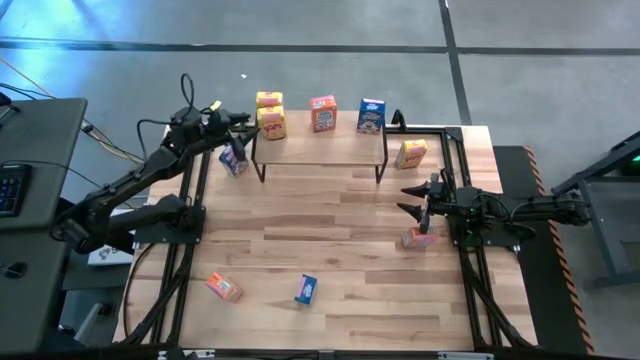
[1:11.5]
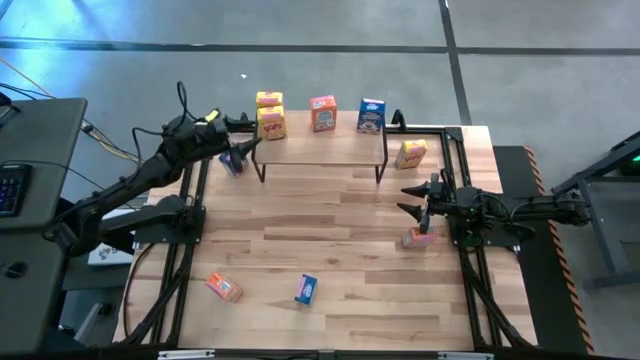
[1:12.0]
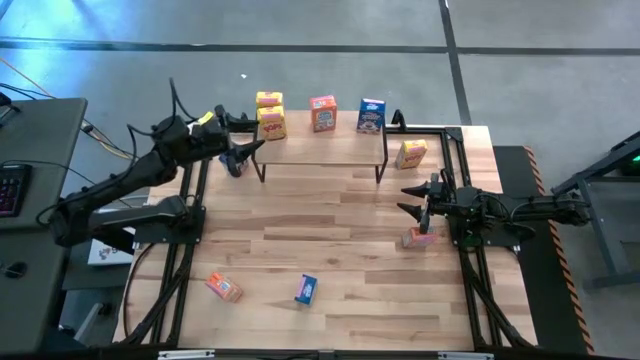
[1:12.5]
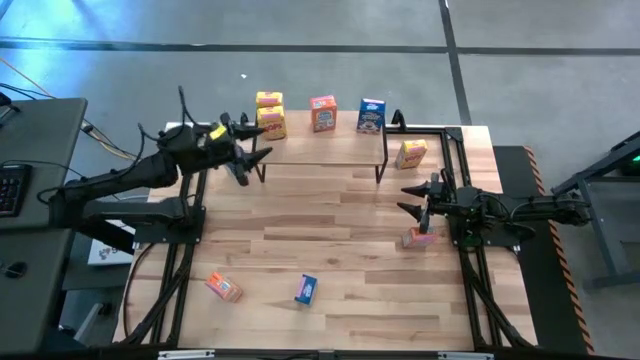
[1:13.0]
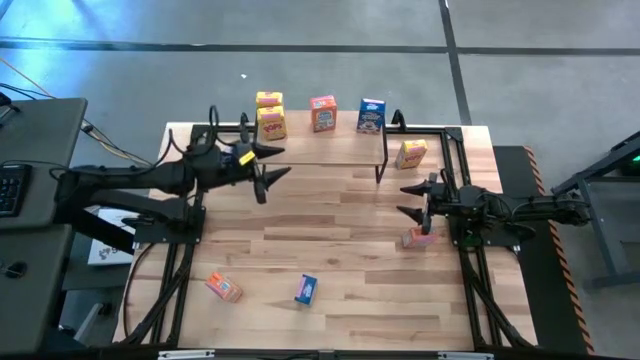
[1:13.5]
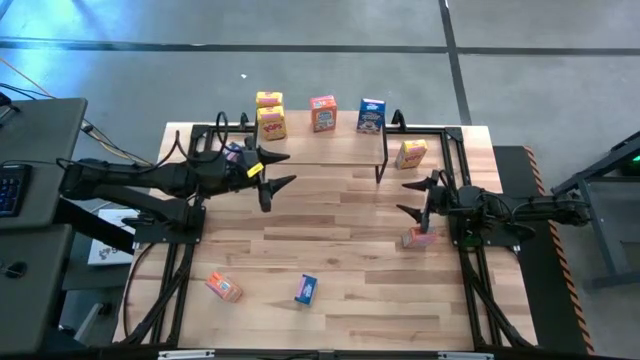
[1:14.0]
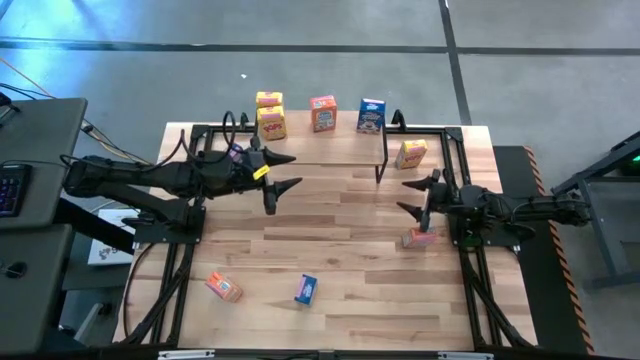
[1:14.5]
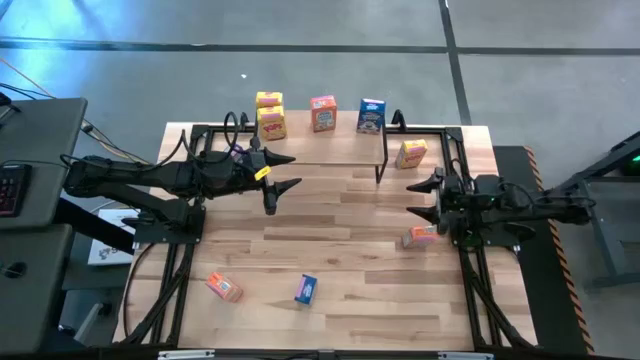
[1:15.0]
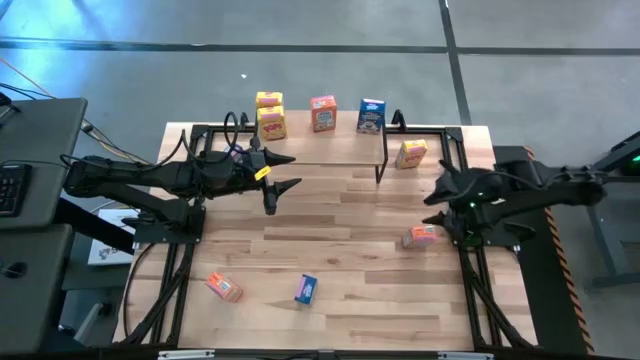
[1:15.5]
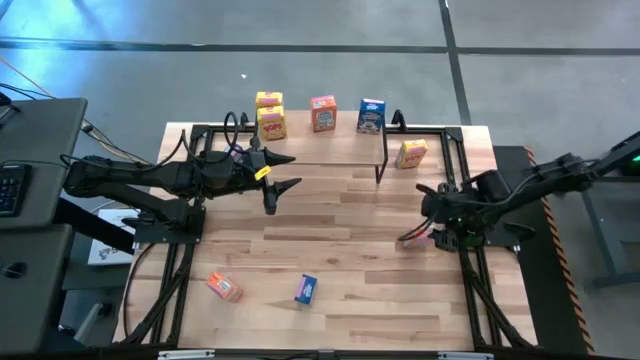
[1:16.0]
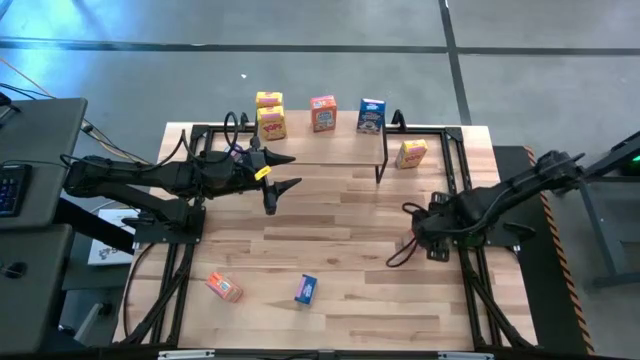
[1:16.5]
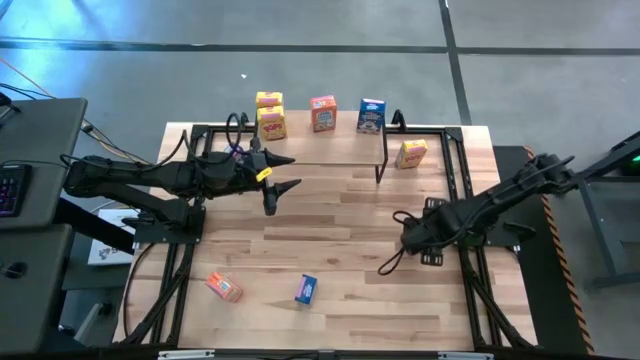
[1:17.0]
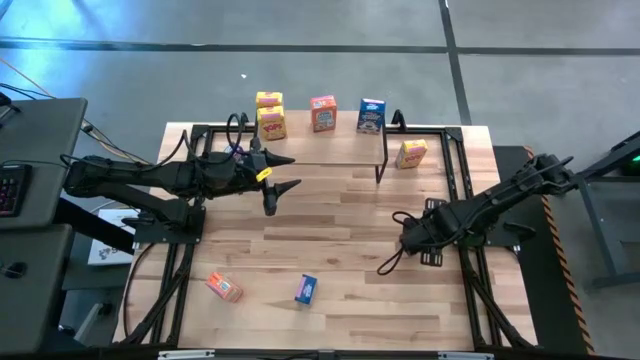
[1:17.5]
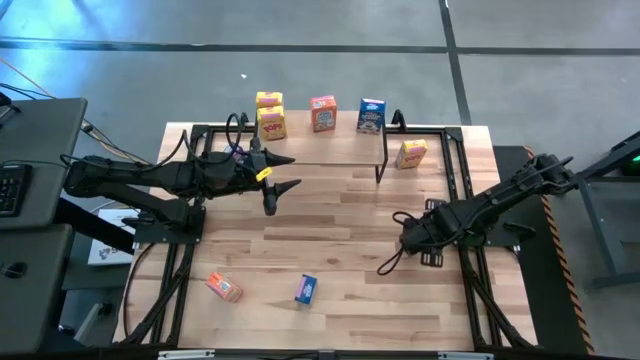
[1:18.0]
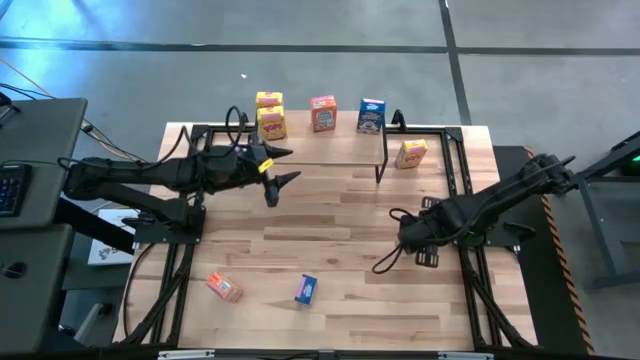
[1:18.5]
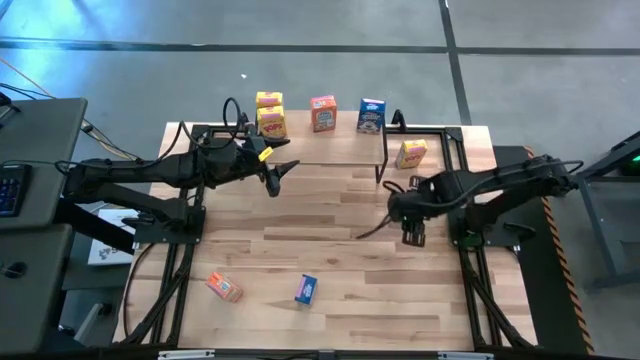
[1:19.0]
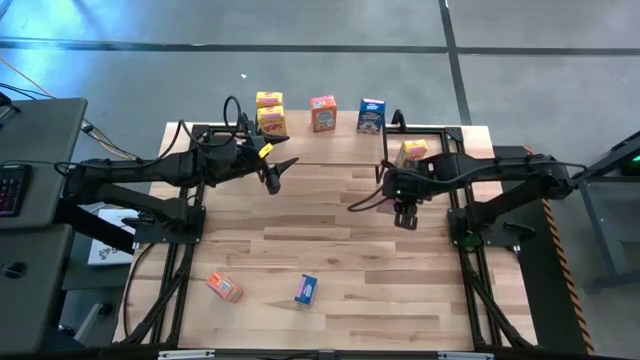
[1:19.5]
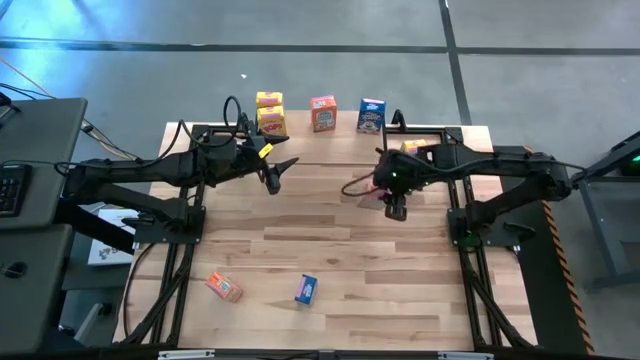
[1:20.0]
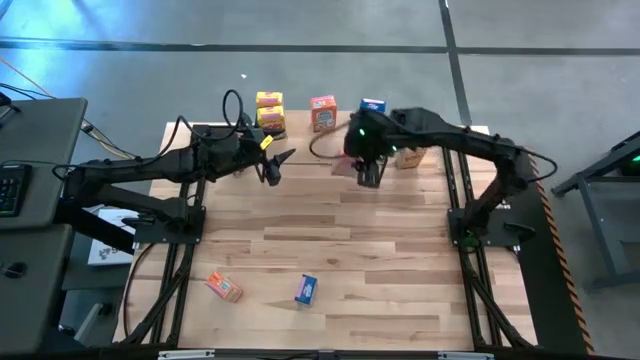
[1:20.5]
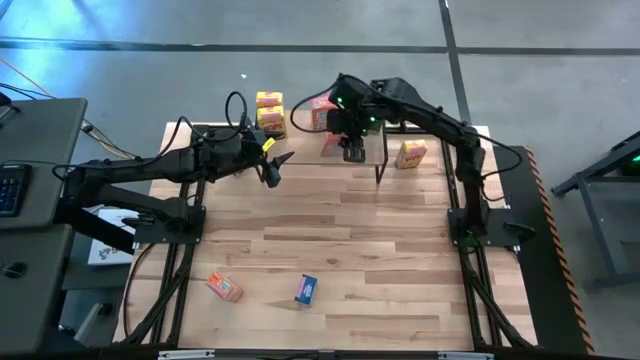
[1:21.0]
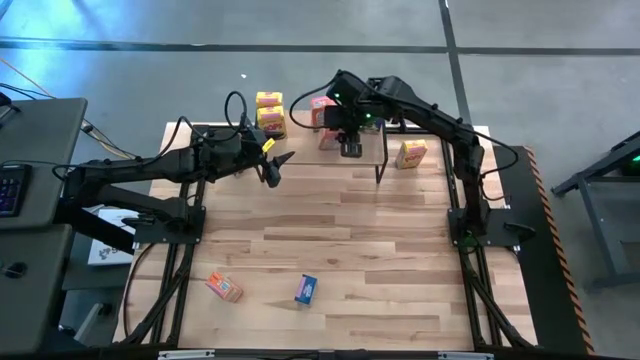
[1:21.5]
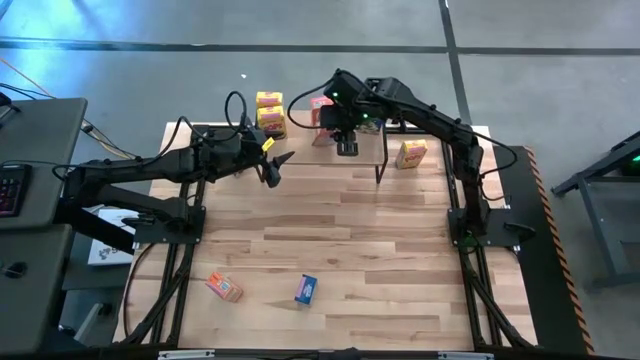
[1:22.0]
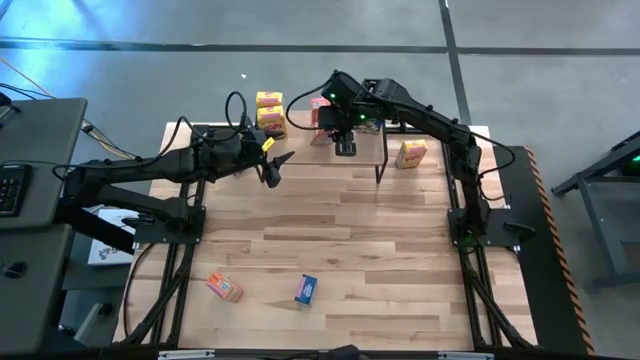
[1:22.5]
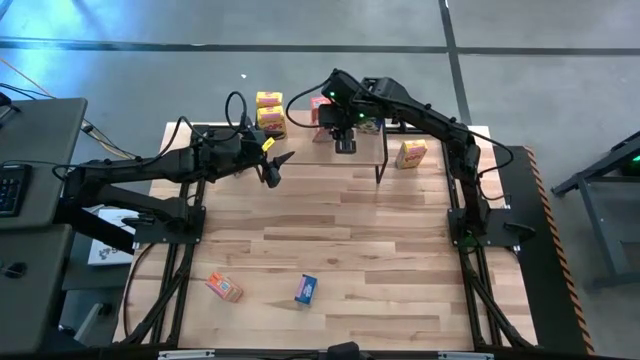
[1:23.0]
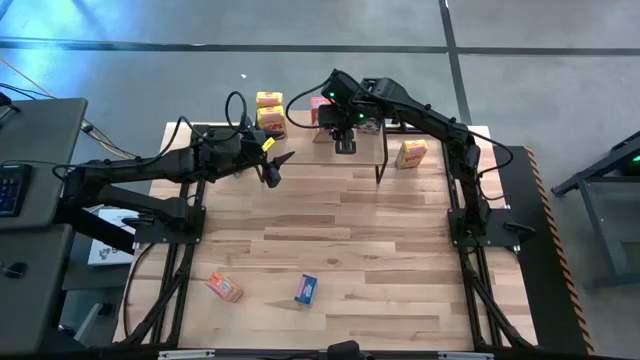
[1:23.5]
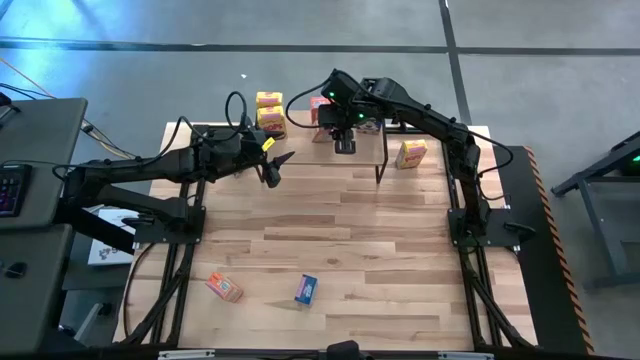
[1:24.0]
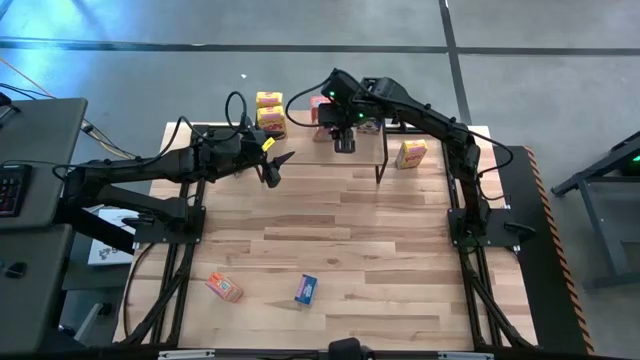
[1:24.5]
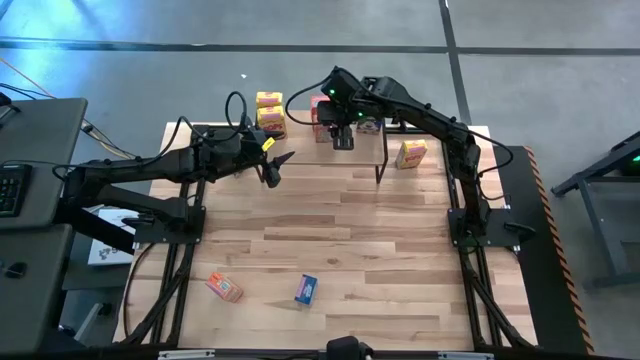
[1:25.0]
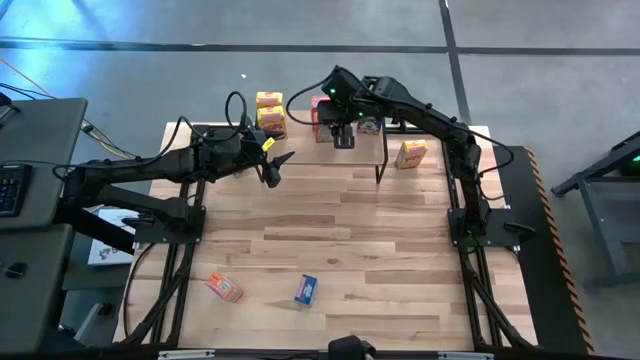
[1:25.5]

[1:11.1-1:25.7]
Task: Stack cereal on shelf
Put the right orange cereal box aligned with the other orange cereal box on the shelf
